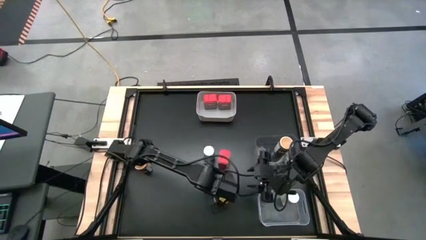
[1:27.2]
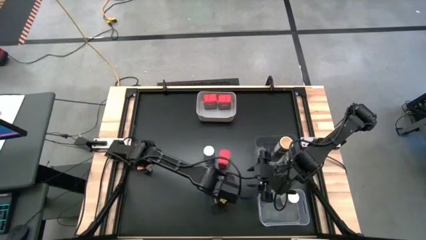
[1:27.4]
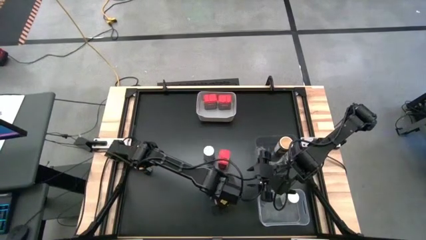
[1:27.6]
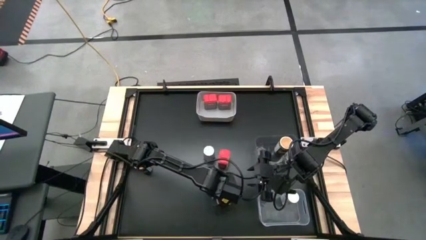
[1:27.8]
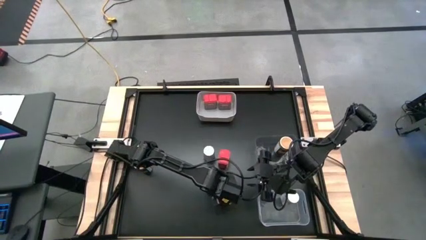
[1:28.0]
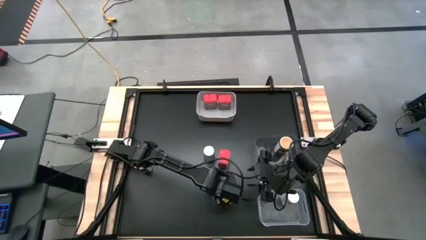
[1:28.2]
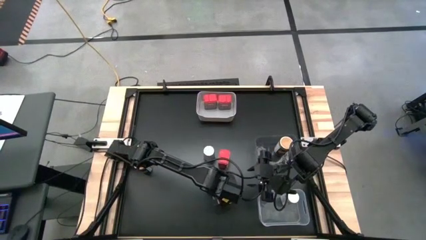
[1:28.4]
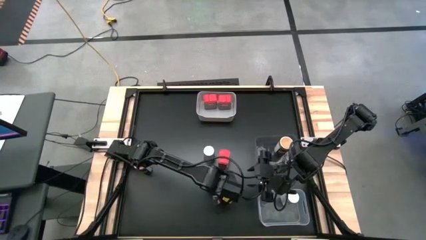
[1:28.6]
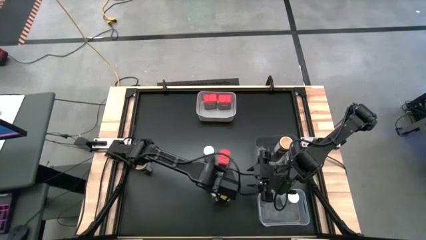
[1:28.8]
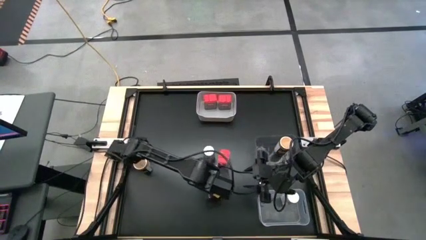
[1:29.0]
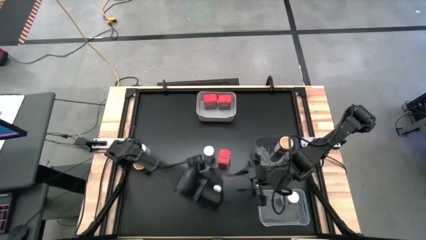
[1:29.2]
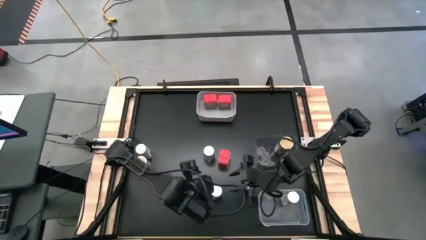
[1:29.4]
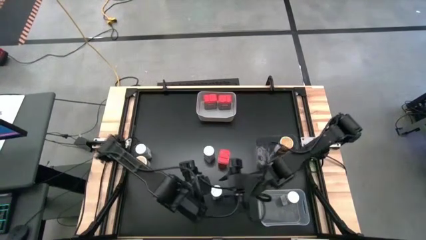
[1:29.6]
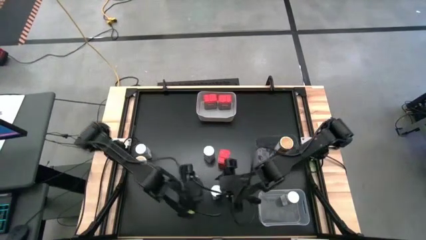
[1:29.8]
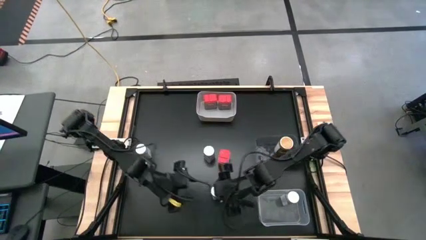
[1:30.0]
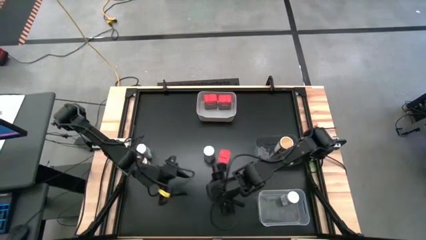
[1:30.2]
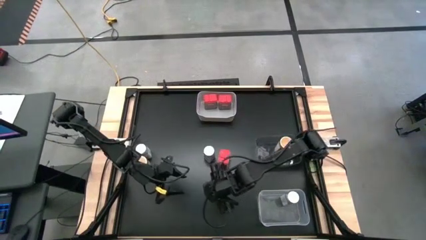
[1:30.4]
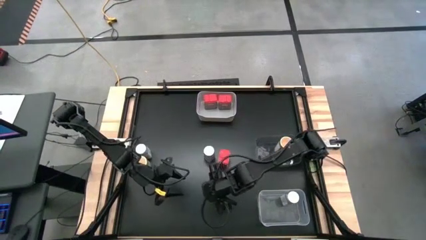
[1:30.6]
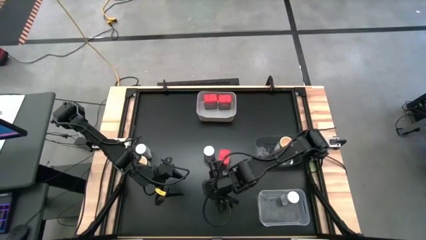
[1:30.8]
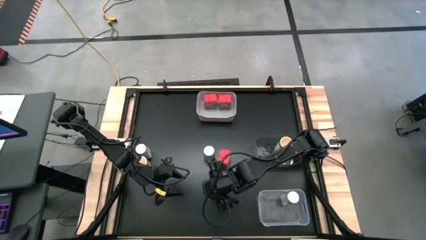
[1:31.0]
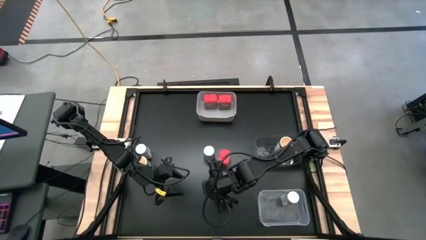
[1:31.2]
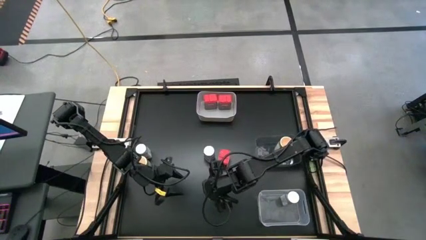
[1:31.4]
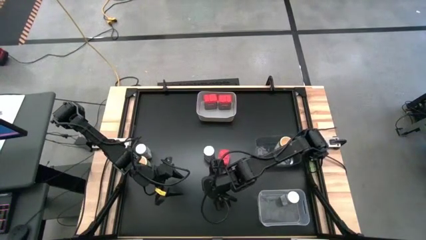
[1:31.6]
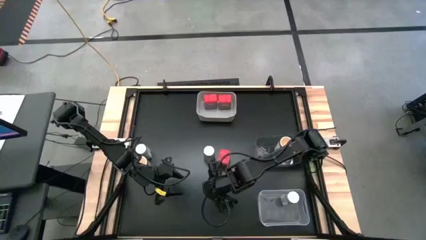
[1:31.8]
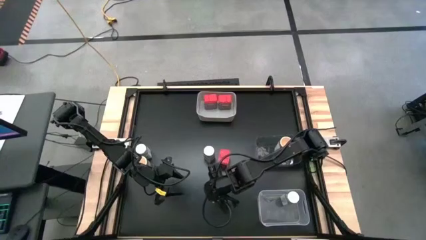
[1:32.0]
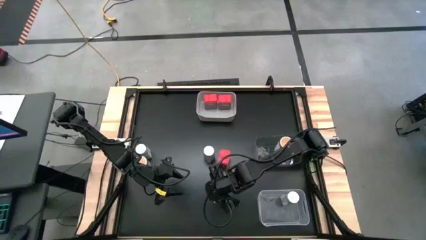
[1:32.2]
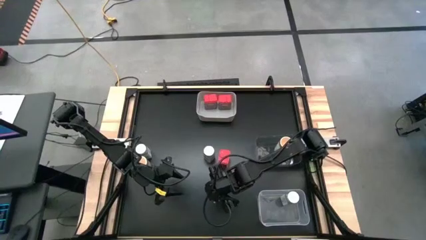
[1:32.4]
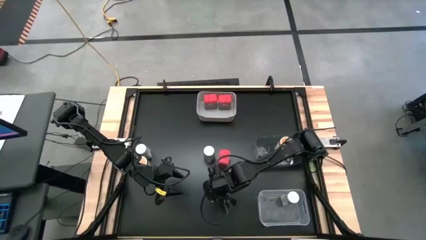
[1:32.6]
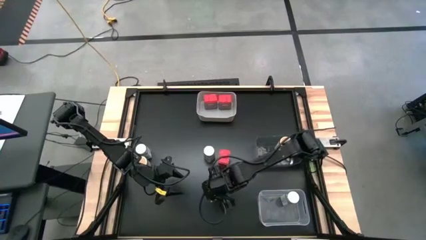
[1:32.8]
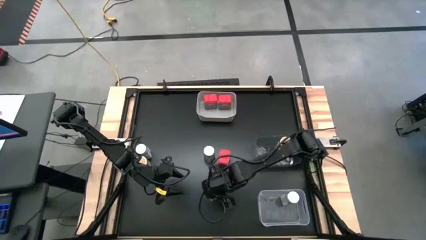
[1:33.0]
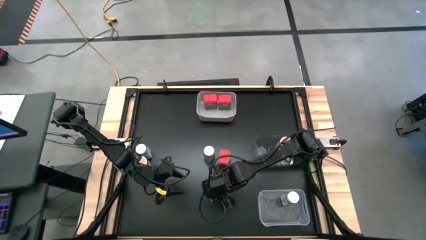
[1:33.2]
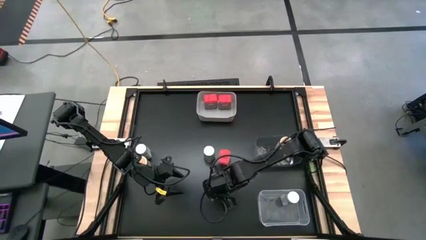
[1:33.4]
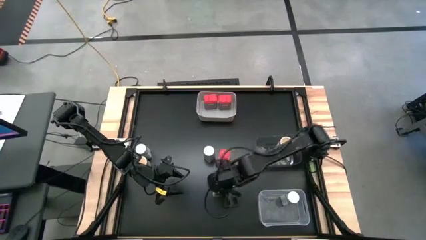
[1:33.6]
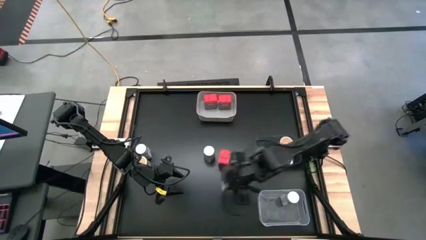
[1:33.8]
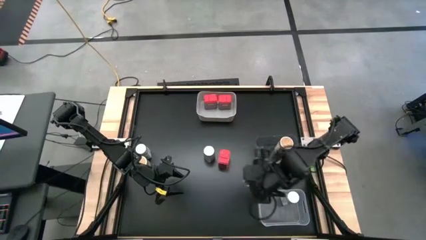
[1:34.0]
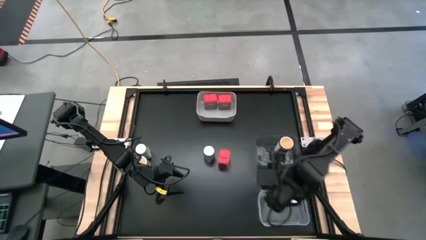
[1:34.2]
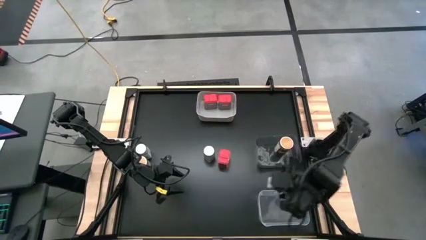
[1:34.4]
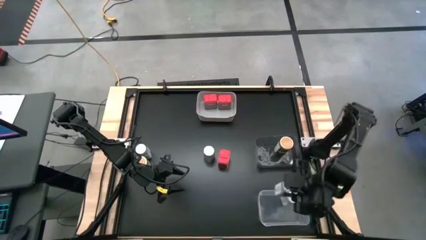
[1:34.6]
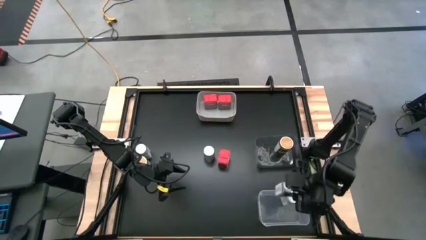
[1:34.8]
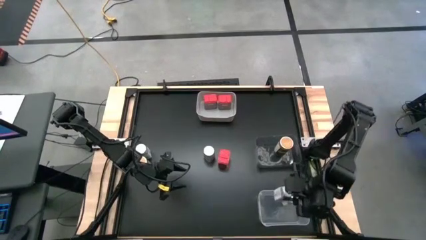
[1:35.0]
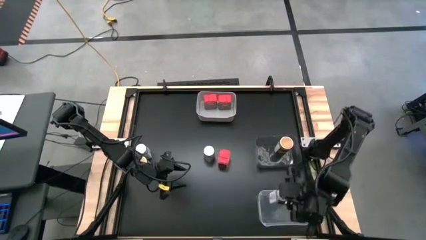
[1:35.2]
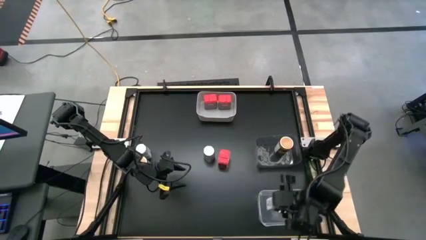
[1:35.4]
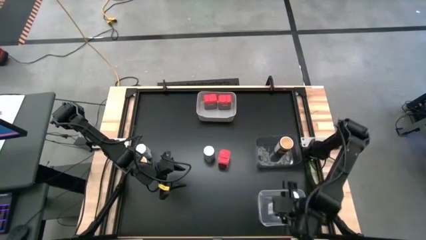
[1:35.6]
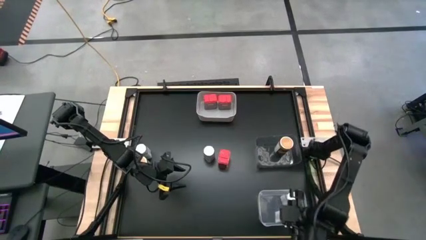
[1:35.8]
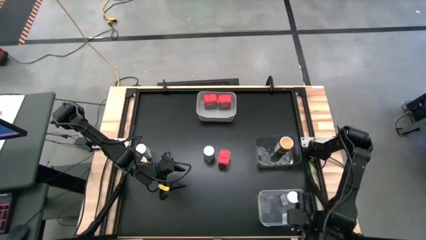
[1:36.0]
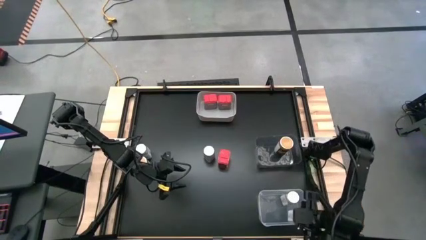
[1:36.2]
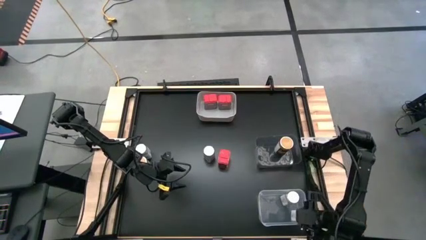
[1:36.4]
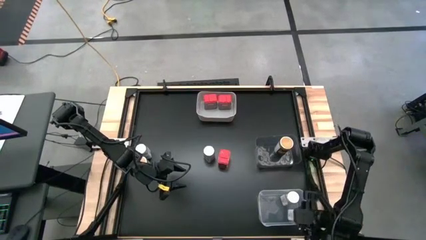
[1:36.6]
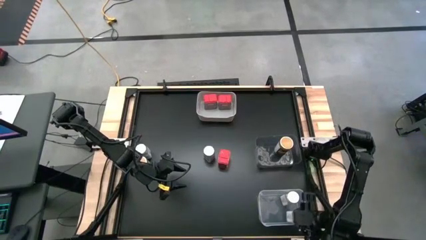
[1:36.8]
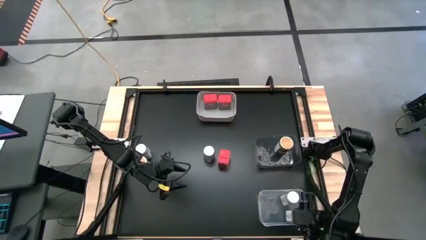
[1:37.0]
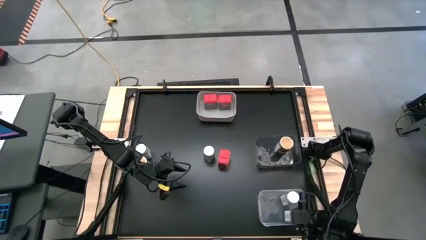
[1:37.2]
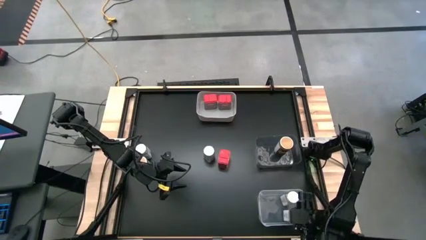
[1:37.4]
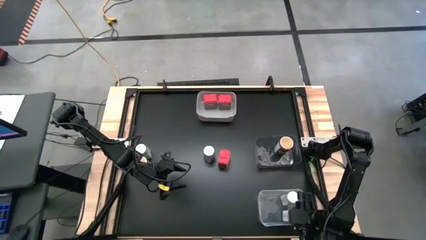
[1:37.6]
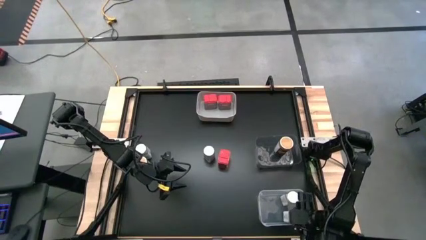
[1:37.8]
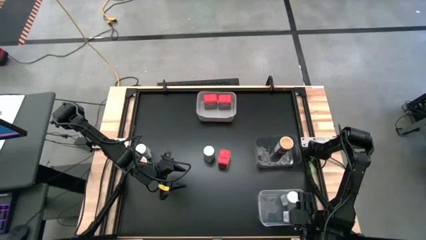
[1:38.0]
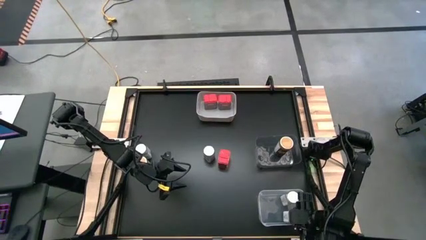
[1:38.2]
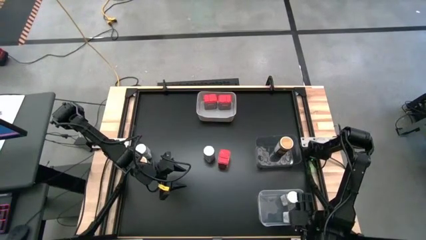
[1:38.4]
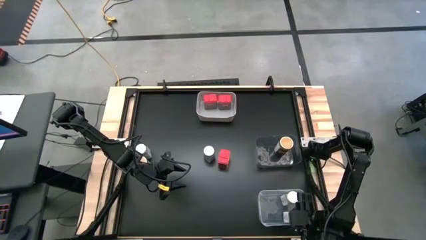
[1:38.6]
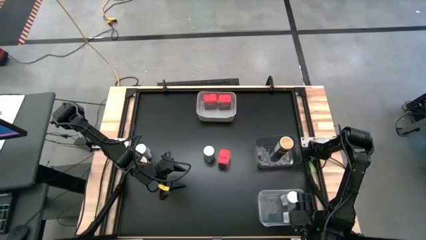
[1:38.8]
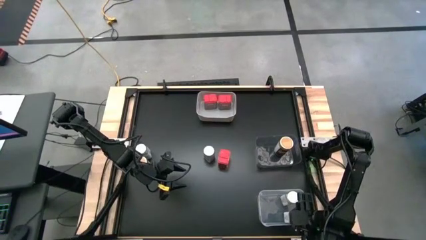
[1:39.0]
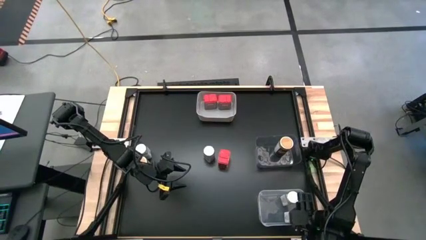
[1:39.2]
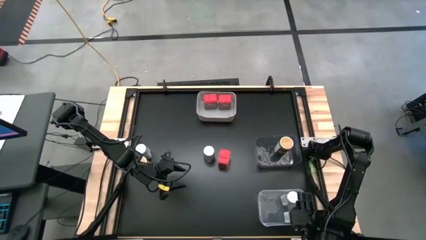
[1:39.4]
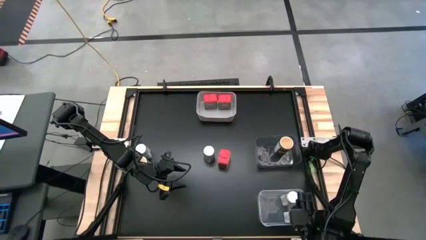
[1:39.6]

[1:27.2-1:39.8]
Task: Sort spices by type
Put the bottom right white seasoning bottle into the transparent bin

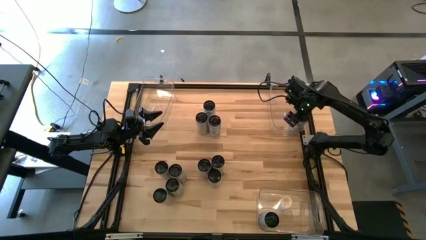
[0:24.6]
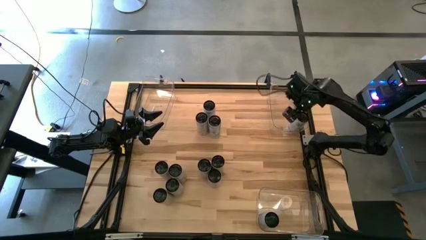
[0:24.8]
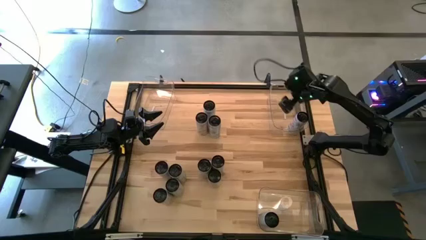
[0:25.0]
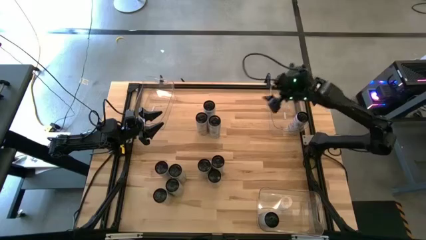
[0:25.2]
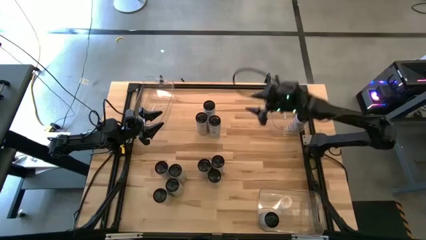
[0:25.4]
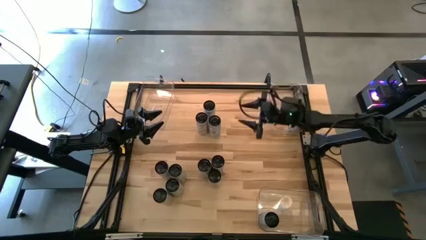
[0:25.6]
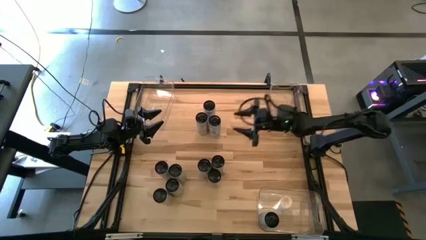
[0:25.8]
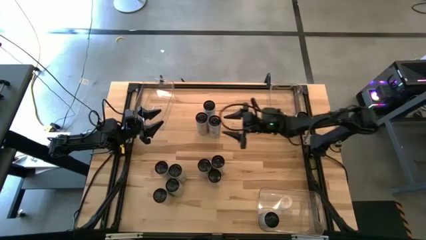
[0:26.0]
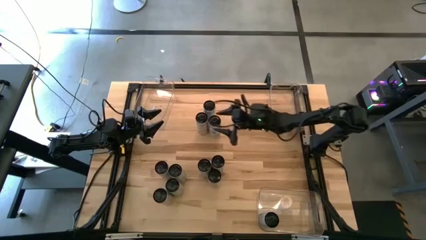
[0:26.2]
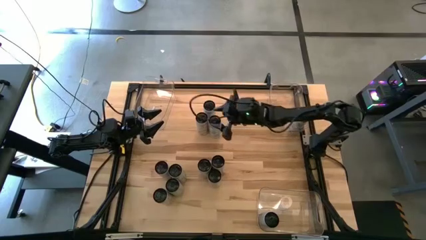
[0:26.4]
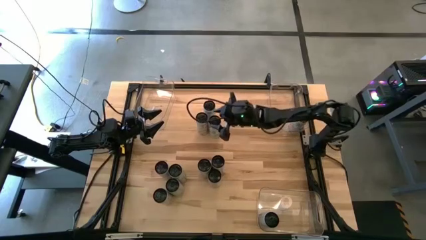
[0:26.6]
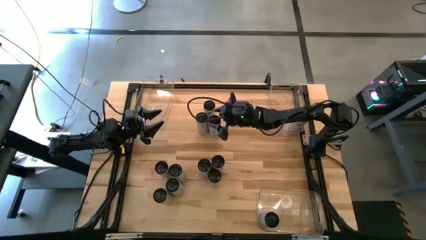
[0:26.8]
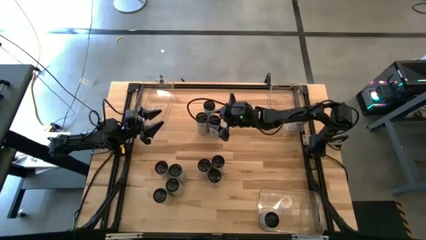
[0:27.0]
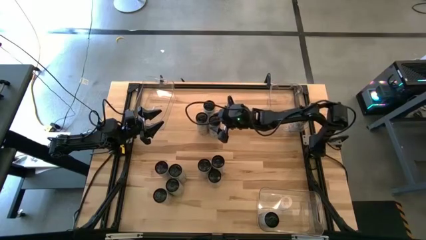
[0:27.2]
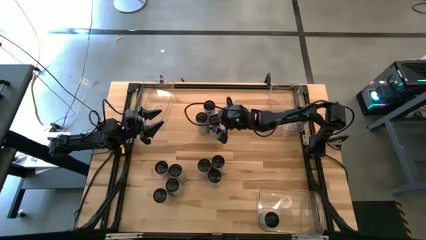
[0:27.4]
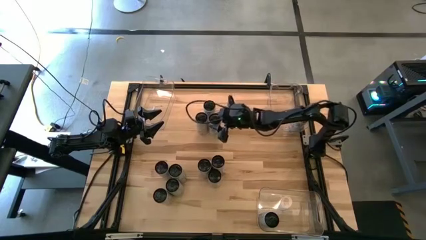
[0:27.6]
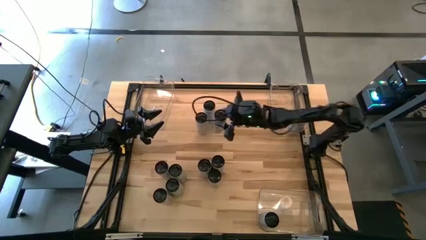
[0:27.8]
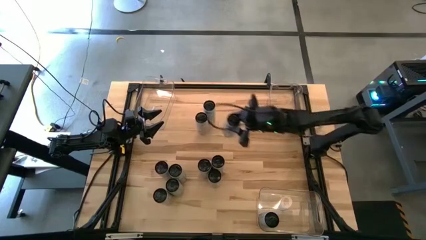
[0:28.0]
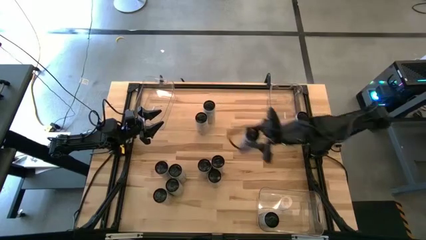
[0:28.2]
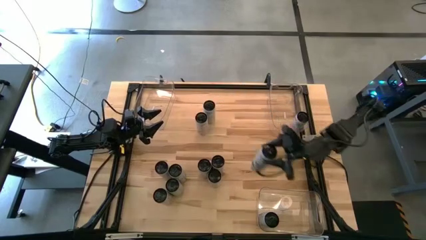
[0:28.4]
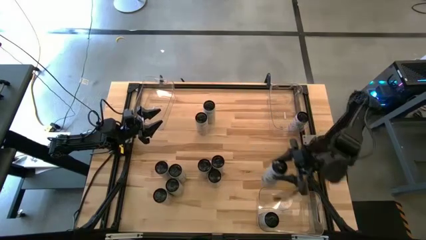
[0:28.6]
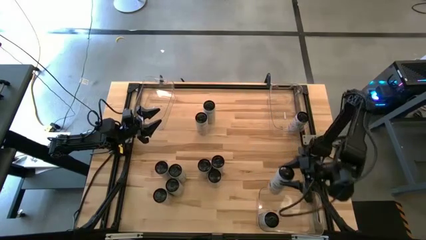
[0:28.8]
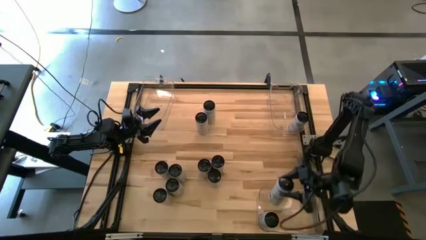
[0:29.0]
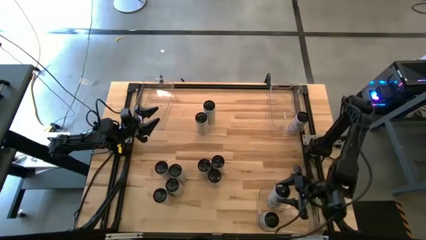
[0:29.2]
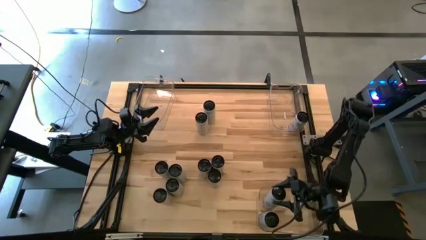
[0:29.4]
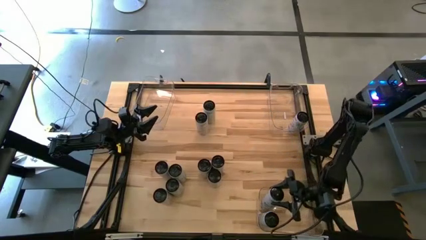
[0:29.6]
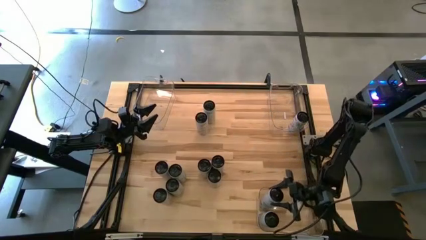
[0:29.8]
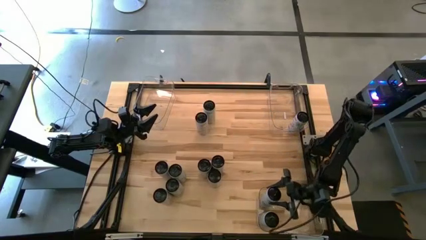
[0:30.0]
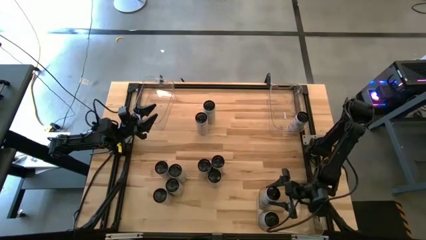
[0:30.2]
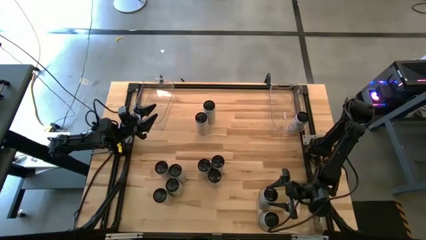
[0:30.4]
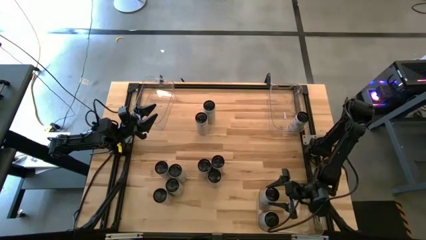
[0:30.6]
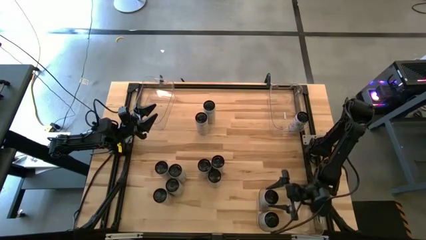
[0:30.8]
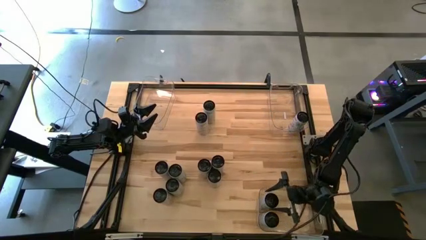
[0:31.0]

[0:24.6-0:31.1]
Task: Sort soda cans
Put the white/blue soda can into the bottom right transparent bin
